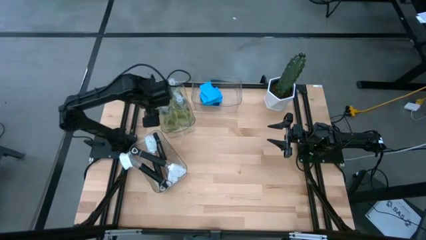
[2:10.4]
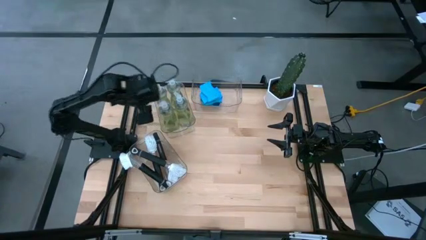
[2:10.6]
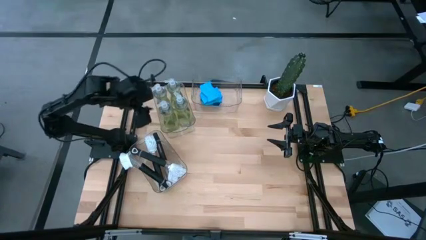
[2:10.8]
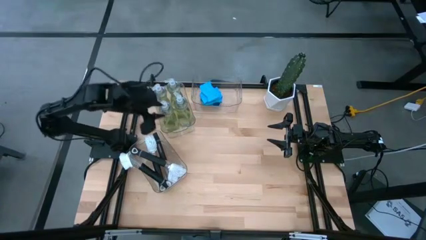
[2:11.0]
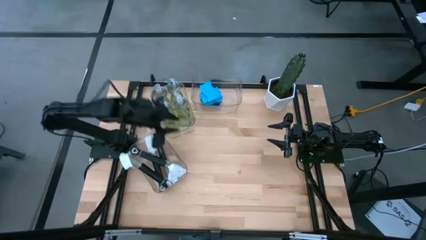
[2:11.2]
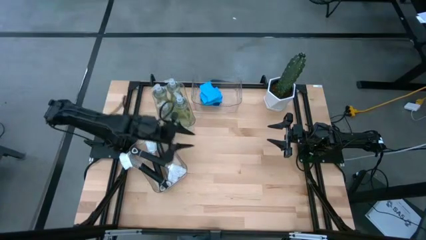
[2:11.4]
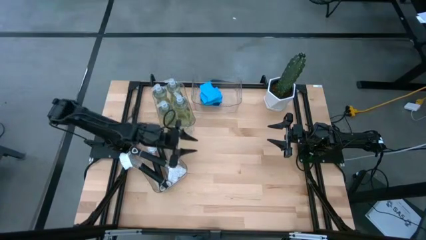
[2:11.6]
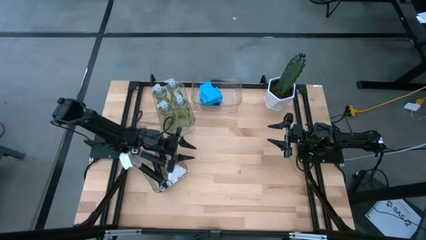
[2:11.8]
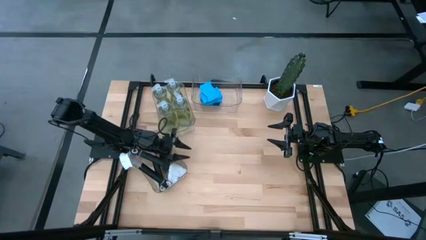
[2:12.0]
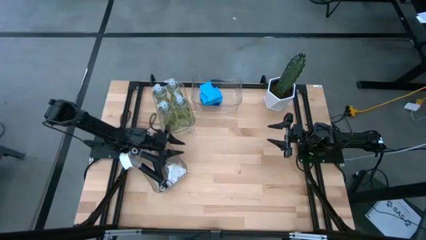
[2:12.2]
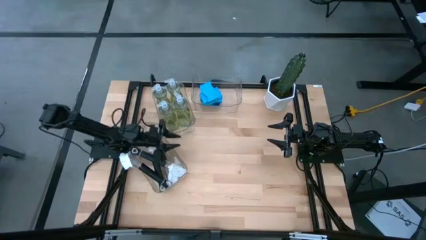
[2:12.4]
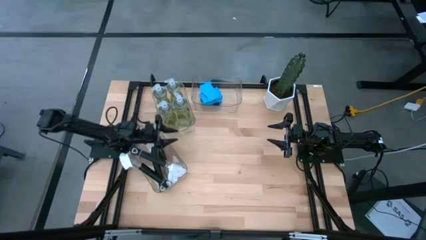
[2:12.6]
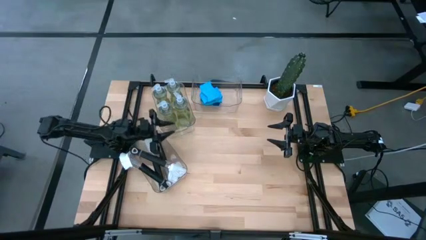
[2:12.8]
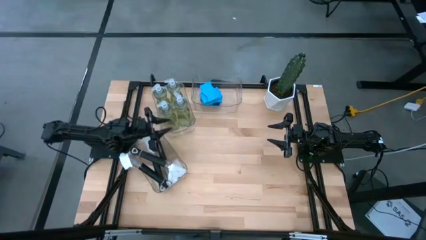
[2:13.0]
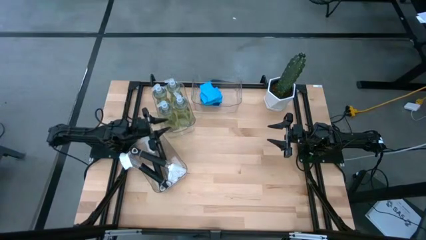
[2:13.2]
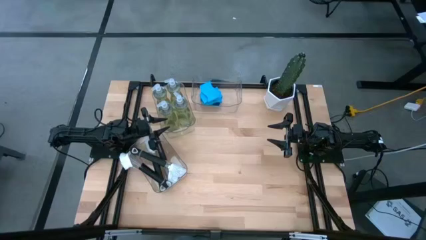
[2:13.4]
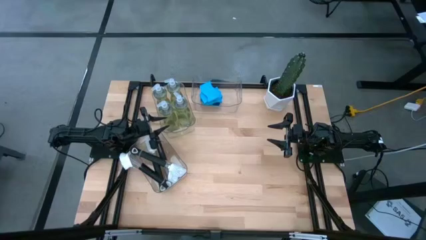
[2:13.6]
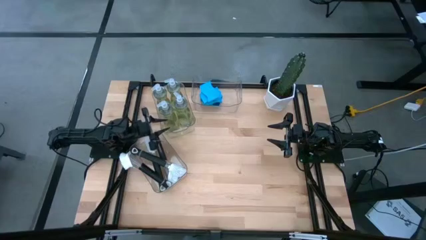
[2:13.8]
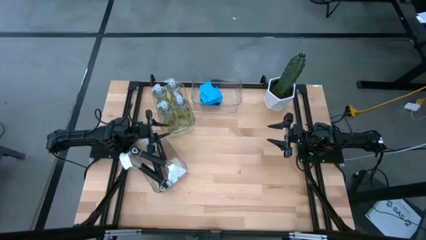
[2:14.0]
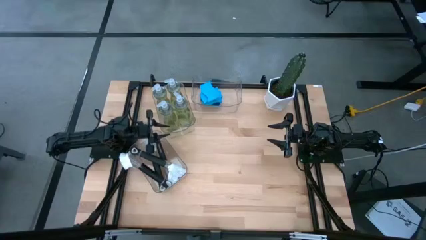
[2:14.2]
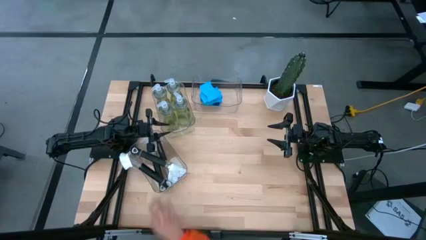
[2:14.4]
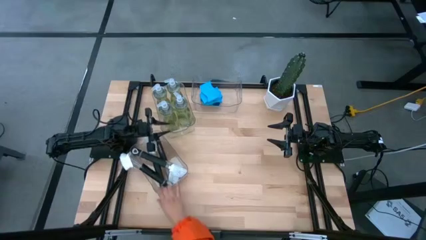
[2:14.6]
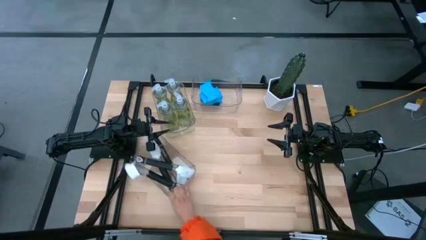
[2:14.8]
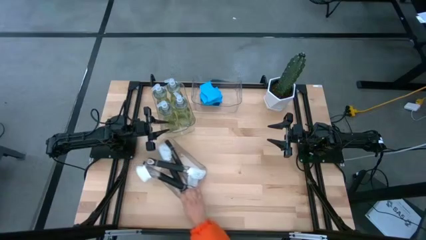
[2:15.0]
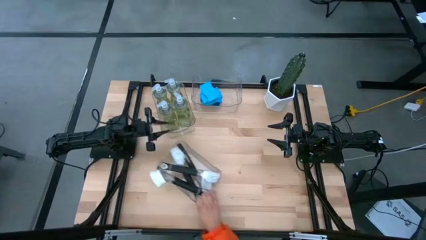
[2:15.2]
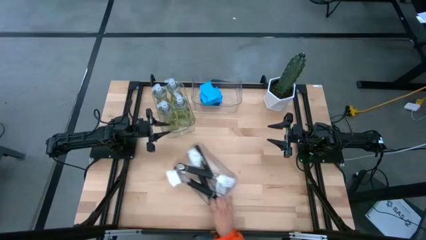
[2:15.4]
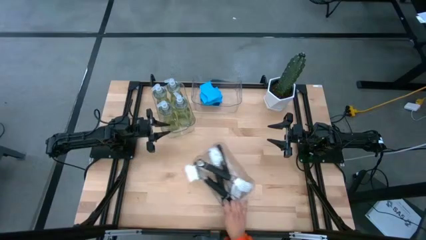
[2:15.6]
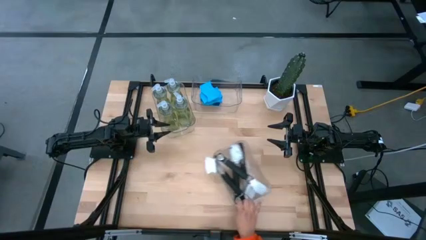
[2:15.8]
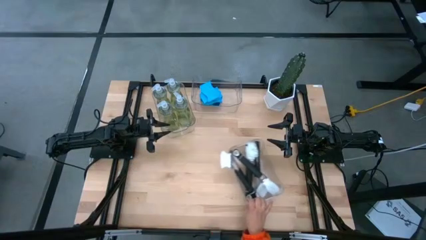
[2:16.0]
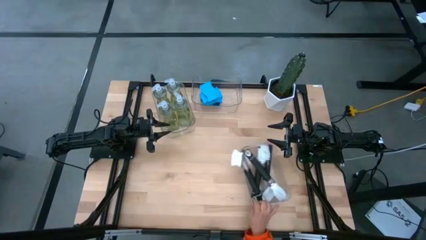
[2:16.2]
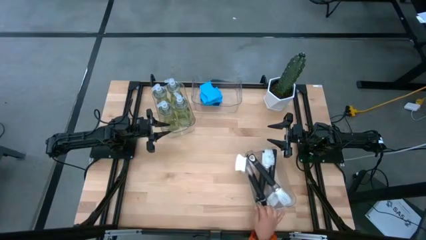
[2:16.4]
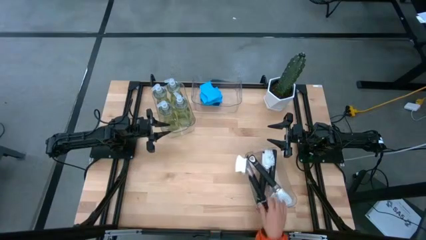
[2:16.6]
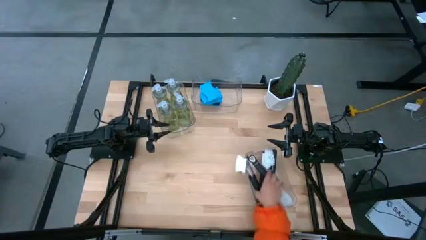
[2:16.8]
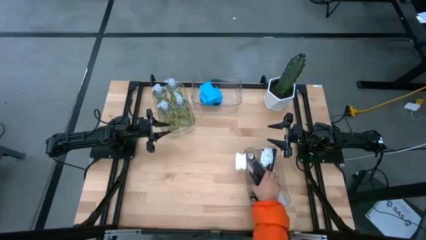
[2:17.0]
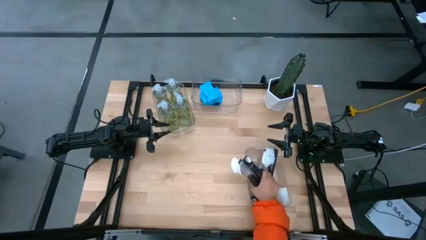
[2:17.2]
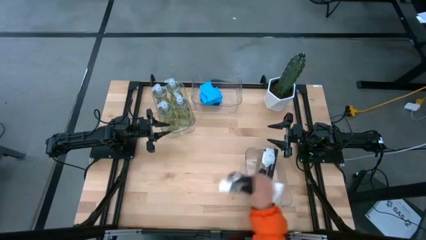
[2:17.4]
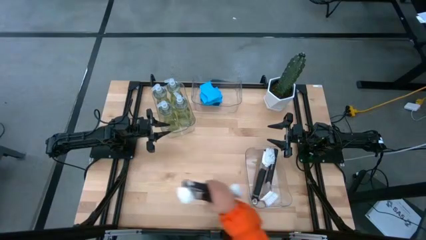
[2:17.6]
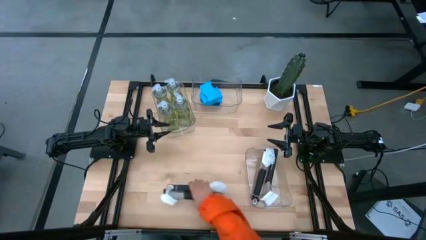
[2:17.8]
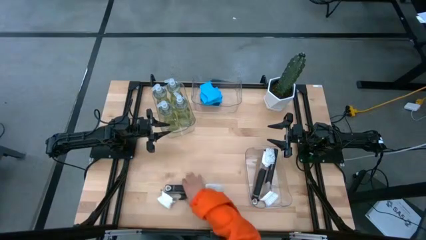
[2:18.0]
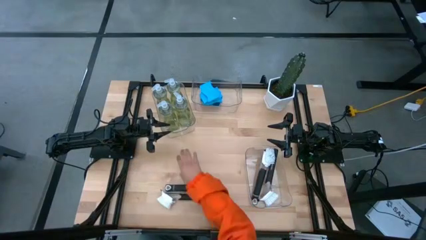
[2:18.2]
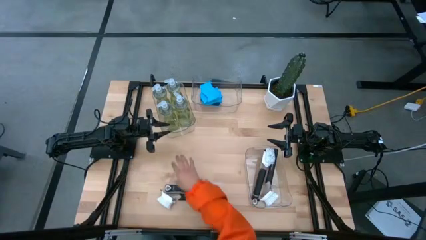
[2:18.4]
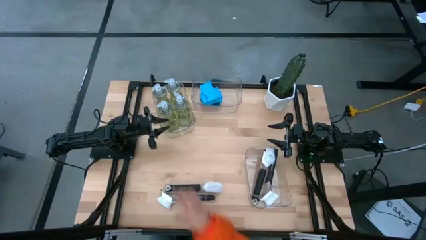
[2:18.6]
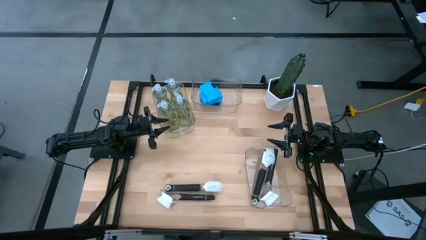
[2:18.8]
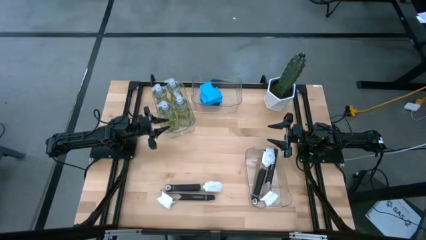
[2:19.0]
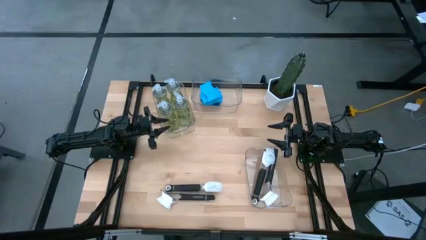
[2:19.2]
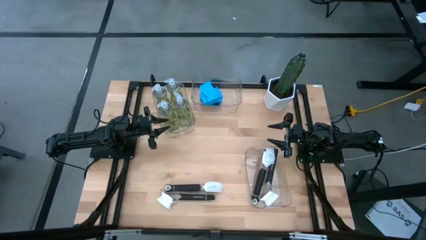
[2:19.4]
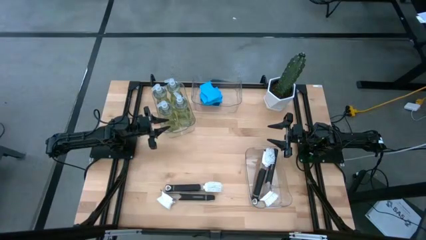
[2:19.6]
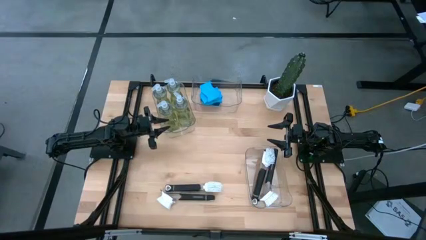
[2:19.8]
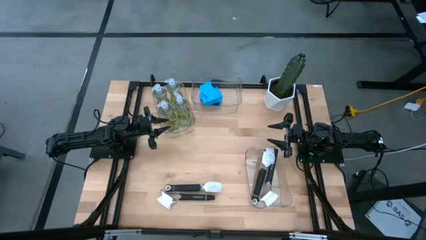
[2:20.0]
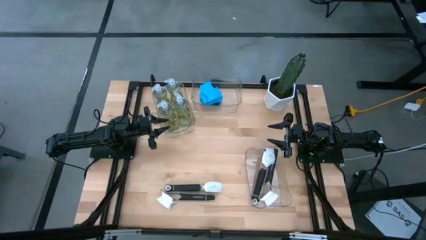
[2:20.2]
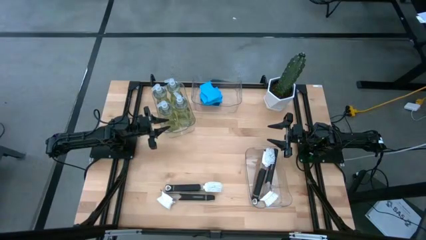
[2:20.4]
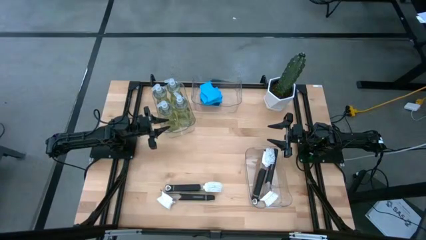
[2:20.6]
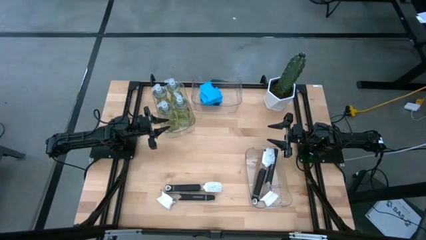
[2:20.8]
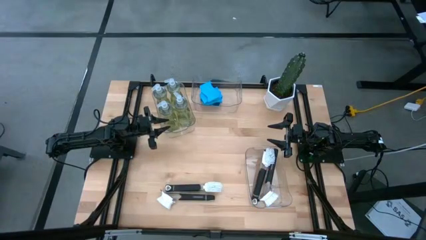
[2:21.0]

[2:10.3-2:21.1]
Task: Pick & Place Kitchen Sink Supplies
Return to Home Position

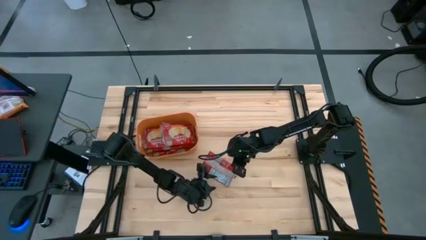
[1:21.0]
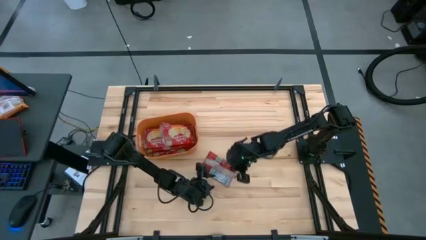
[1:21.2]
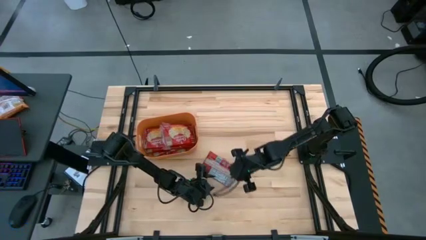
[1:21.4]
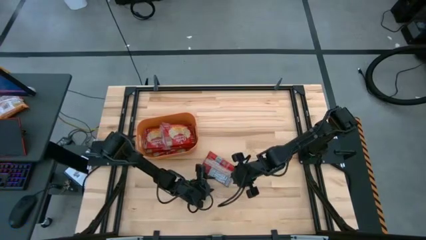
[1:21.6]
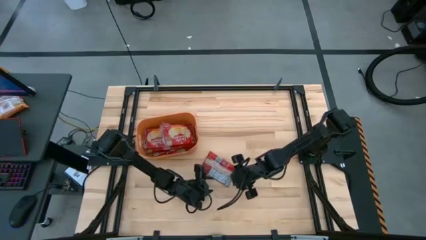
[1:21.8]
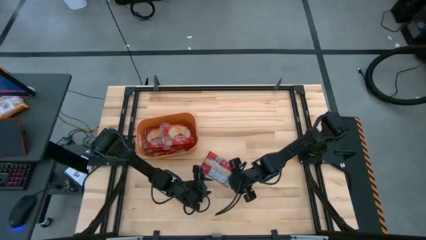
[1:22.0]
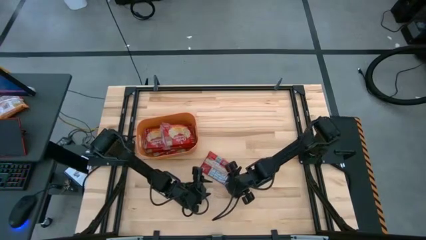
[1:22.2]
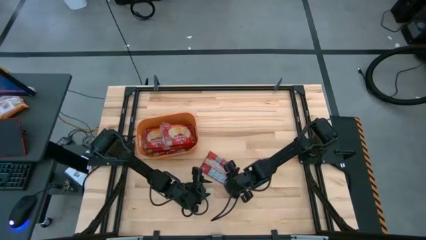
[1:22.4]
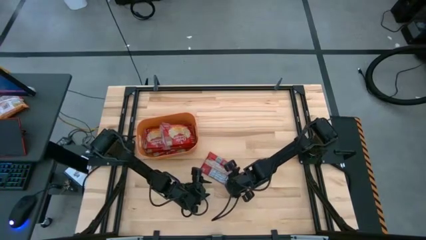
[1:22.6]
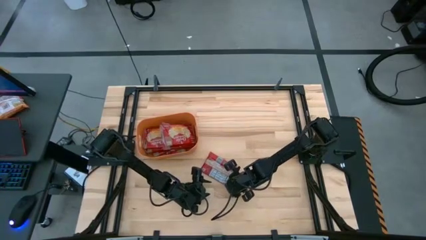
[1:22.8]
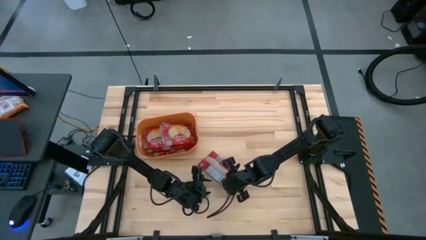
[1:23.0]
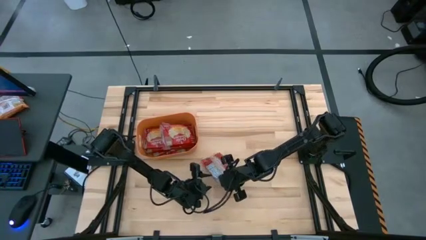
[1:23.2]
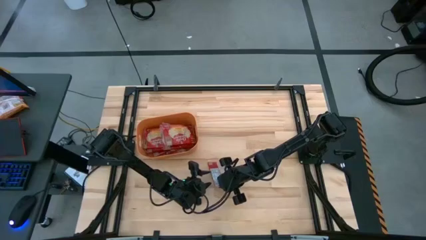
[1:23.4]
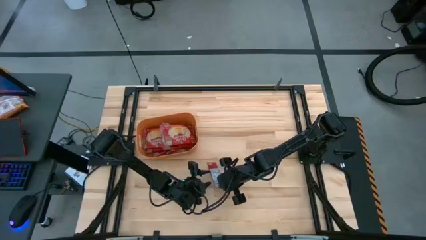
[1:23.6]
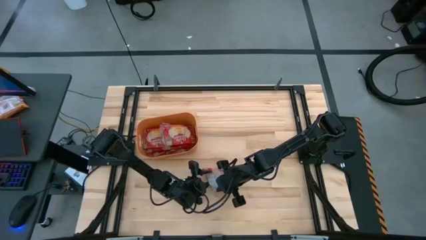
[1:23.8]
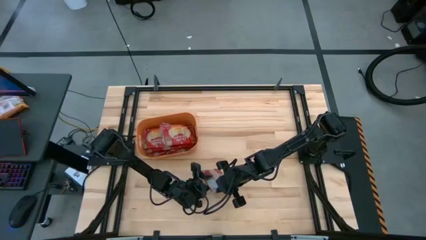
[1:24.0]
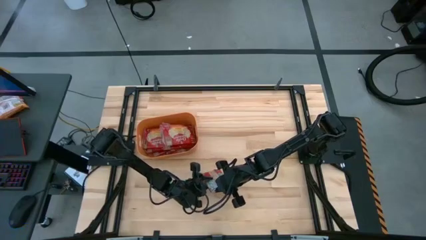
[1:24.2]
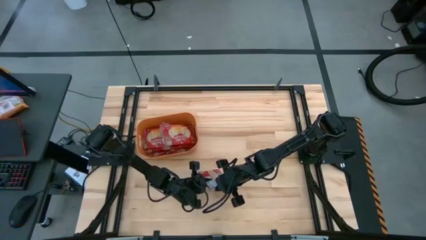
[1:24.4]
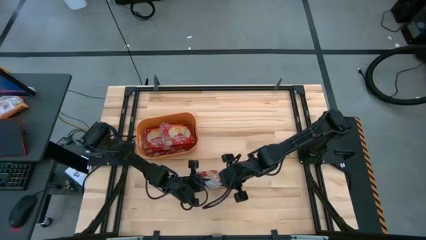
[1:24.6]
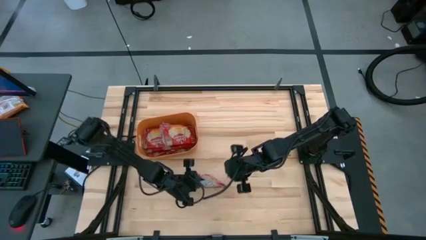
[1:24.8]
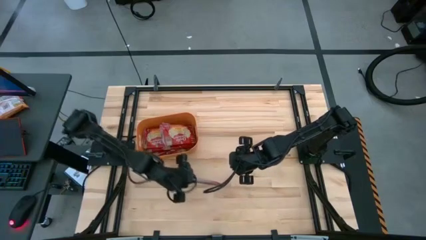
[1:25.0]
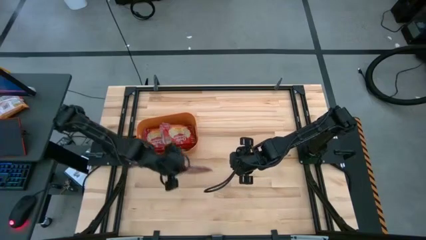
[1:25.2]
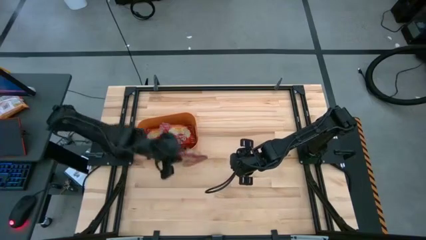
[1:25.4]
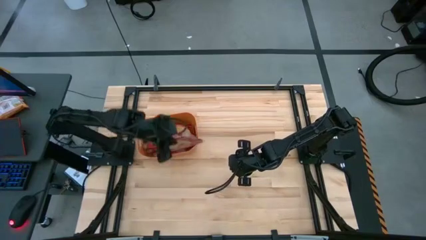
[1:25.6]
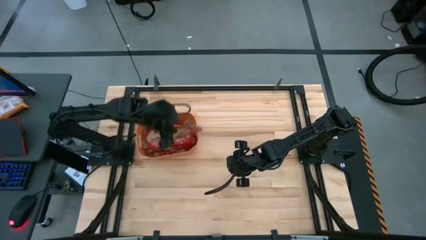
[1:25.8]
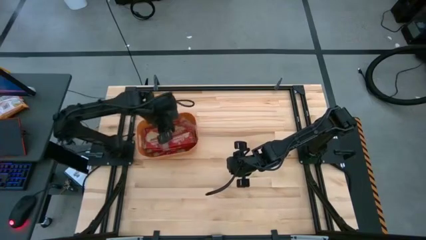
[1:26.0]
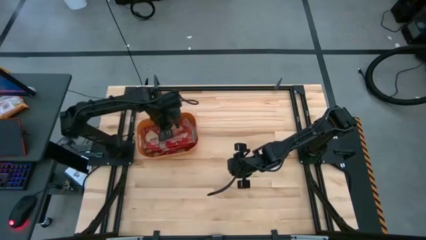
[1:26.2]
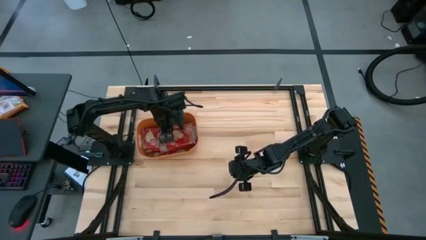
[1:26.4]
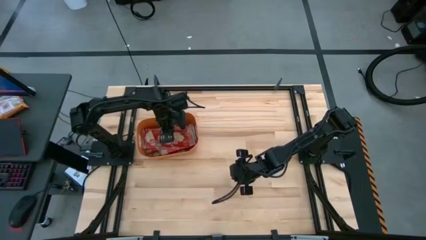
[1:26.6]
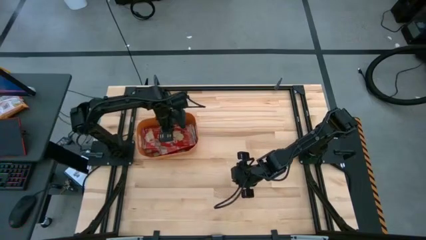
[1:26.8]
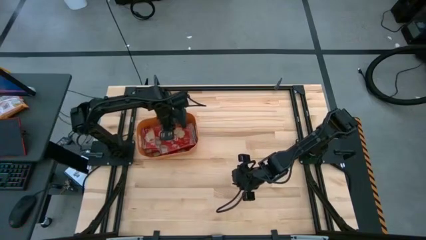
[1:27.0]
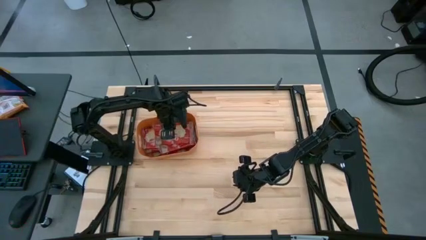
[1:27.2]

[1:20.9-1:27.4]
Task: Sort popcorn bags into baskets
Put the red popcorn bag into the orange bin
